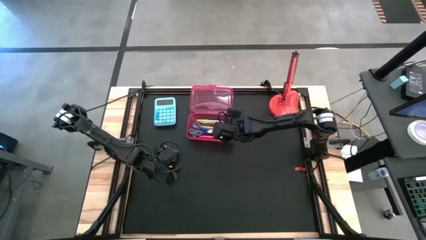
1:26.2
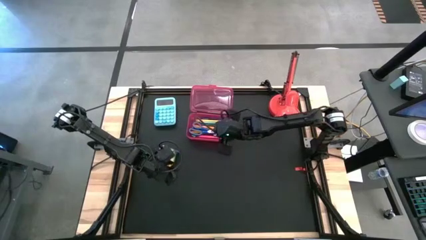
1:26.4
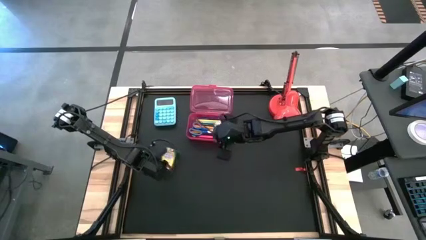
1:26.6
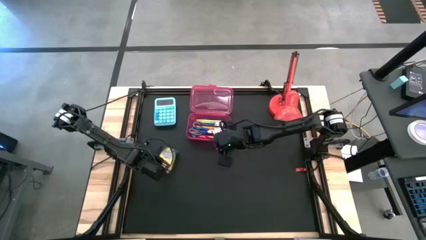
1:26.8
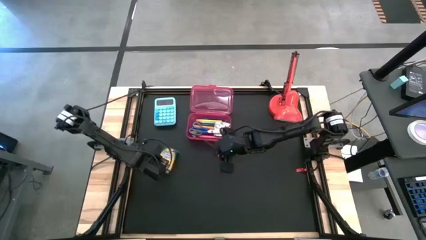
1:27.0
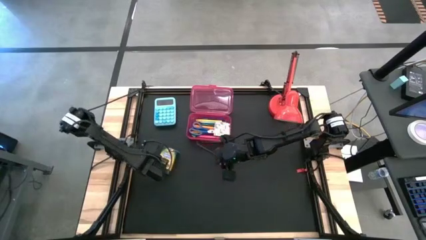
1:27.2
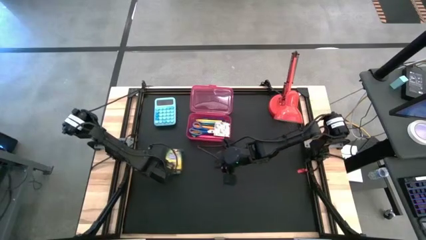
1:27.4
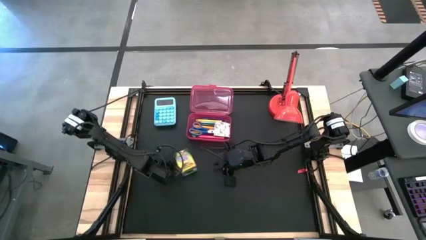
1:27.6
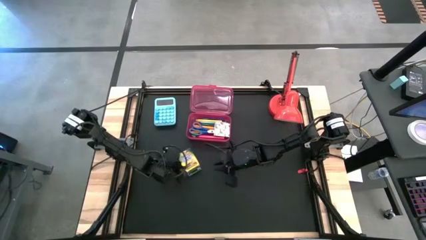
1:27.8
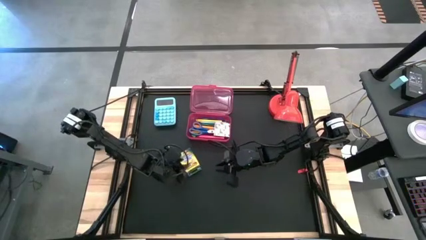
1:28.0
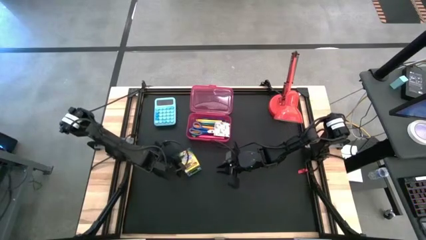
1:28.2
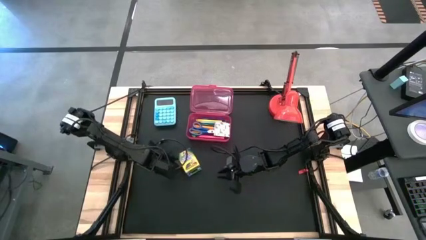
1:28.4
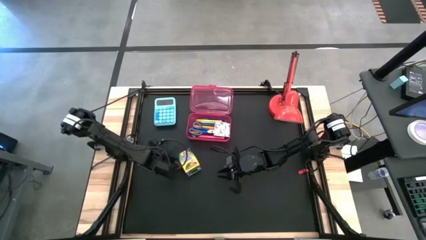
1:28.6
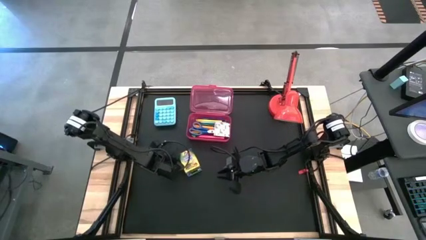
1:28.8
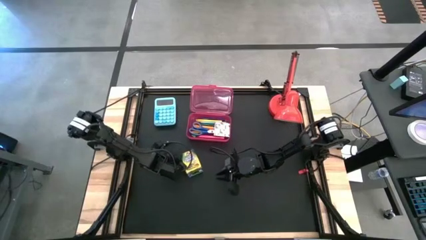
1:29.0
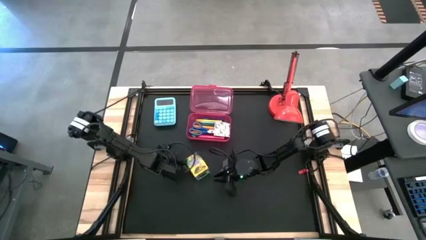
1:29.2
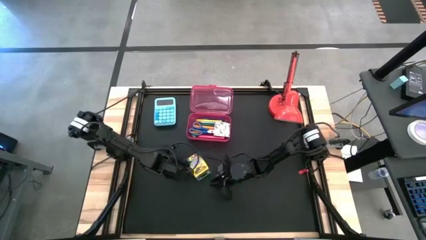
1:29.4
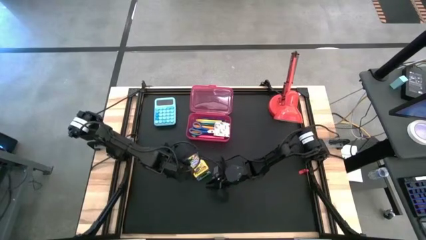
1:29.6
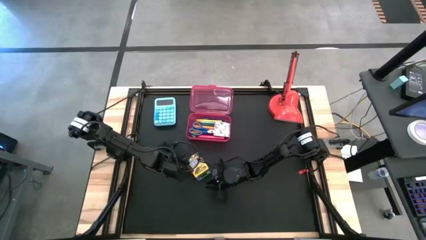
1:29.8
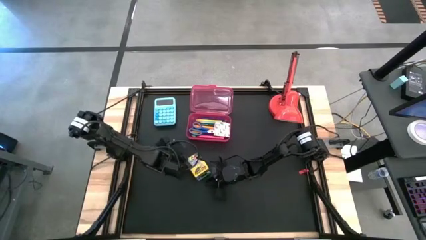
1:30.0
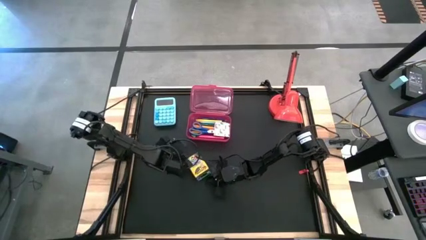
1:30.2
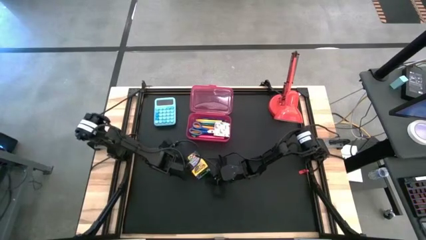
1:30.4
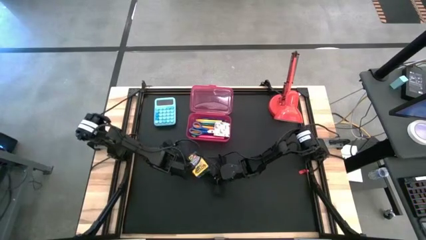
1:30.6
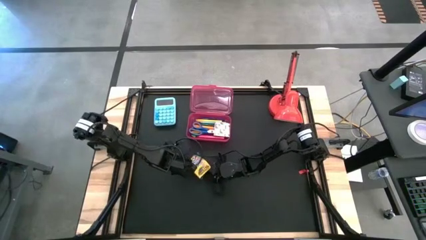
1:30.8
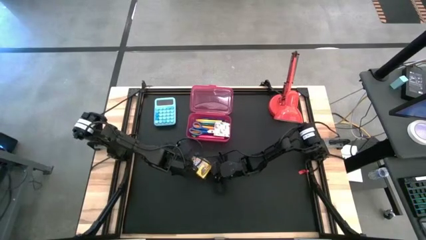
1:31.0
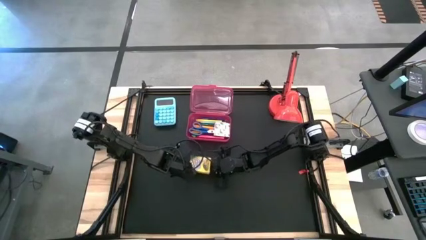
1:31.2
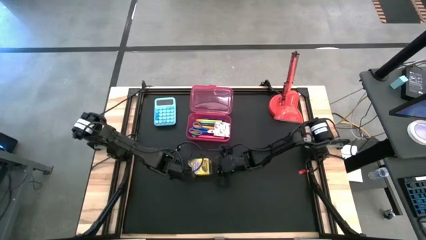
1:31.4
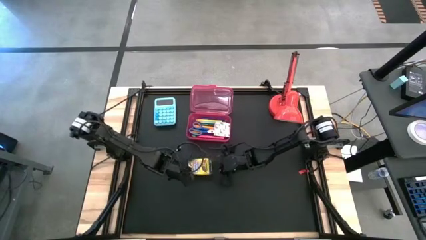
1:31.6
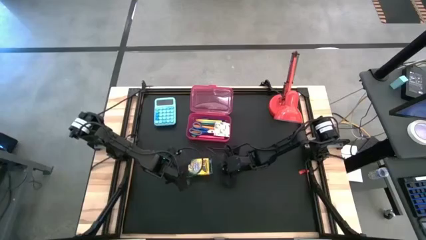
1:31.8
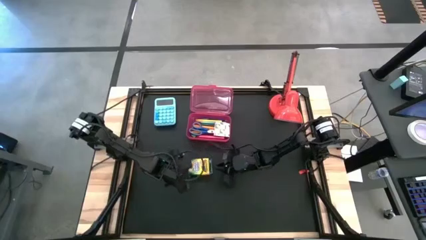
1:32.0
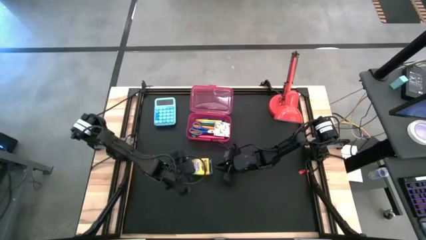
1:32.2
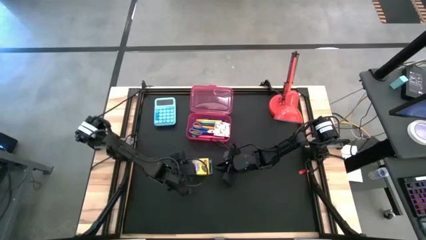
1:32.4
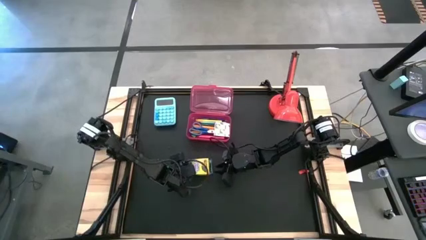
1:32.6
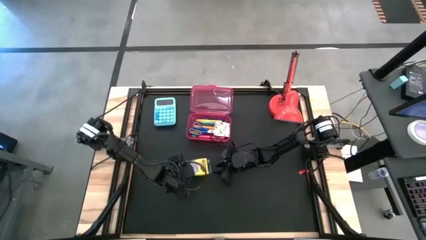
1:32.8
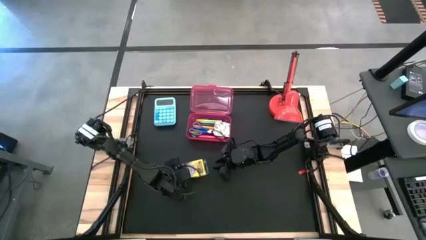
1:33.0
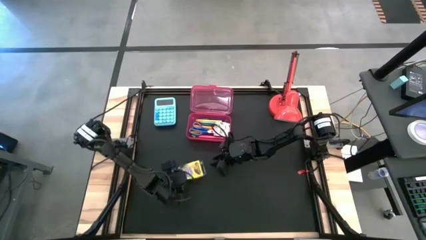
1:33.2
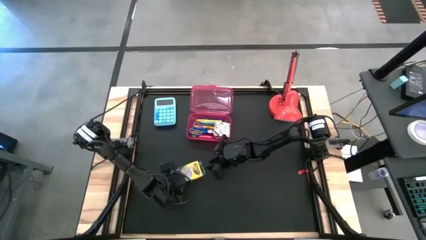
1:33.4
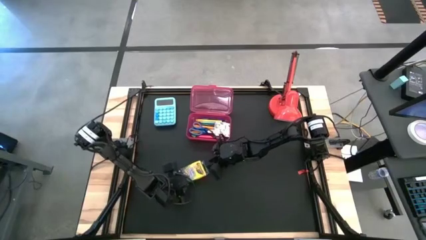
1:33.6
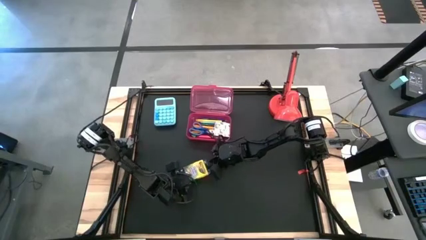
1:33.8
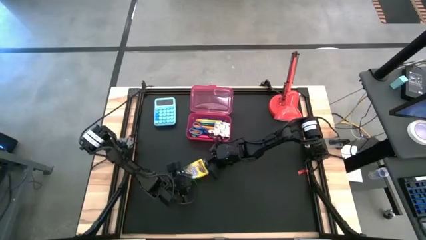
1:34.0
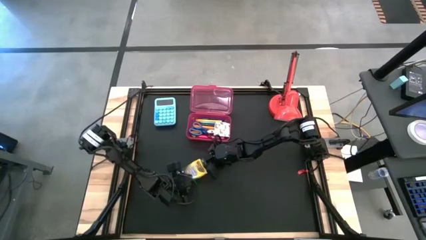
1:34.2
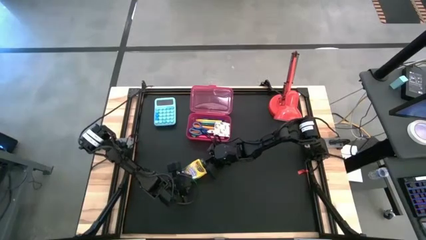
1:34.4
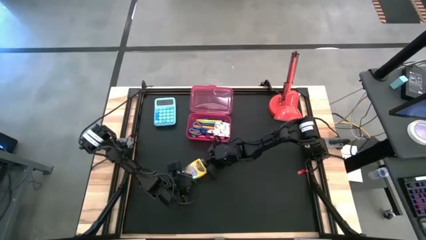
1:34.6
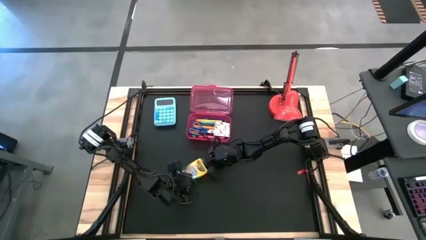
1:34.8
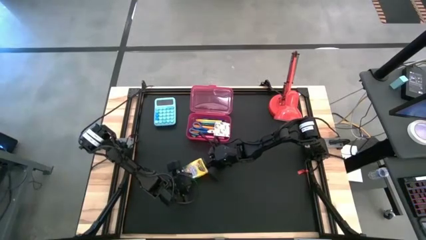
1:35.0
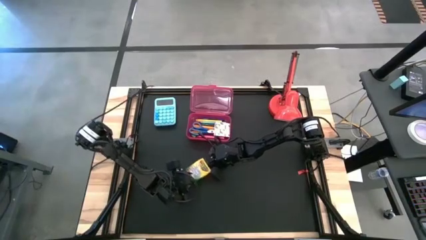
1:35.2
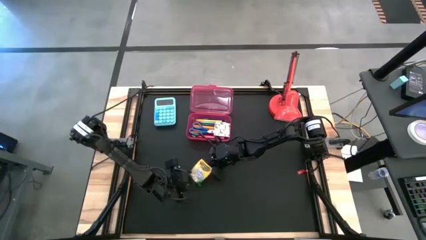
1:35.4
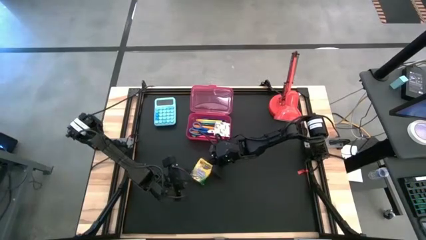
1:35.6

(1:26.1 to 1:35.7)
Task: Pack school essentials
Put the yellow crayon box into the pink supply box

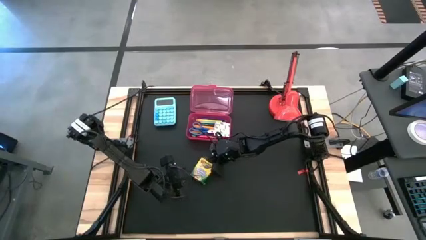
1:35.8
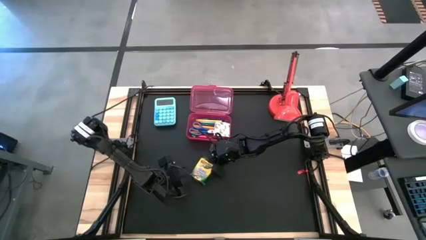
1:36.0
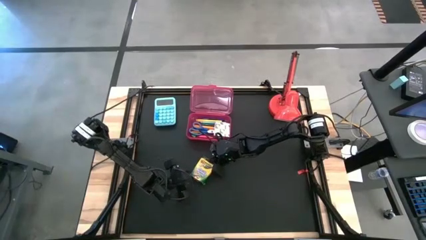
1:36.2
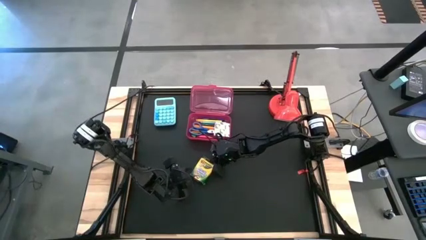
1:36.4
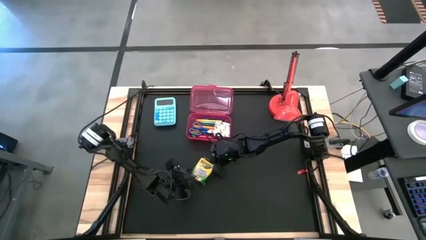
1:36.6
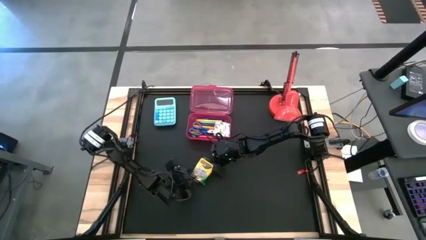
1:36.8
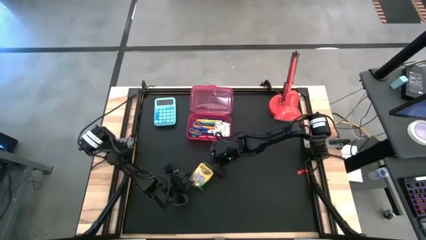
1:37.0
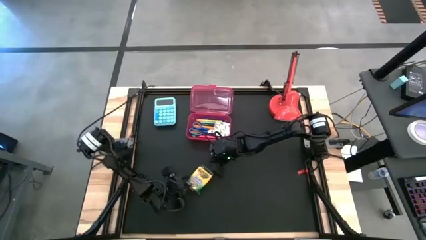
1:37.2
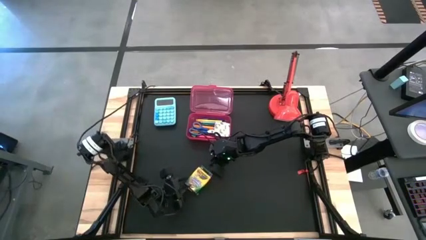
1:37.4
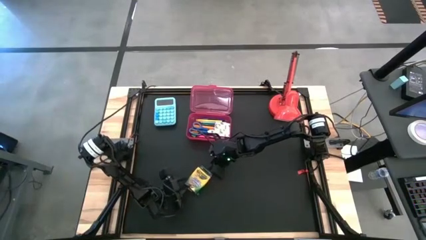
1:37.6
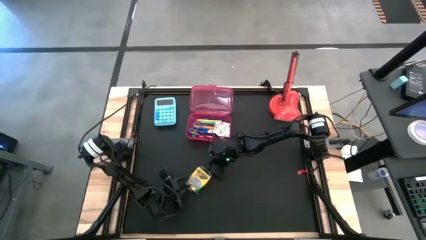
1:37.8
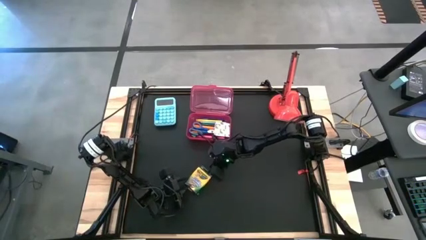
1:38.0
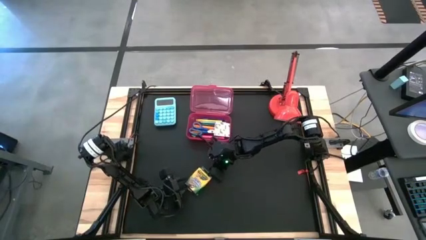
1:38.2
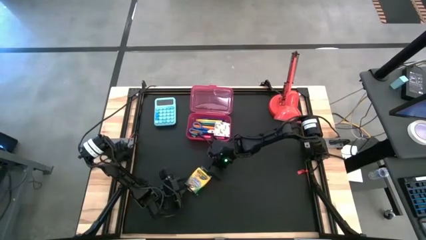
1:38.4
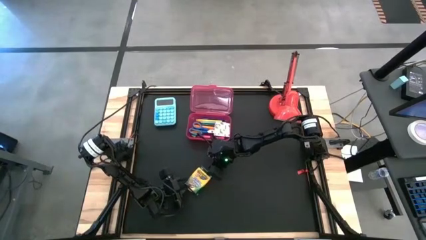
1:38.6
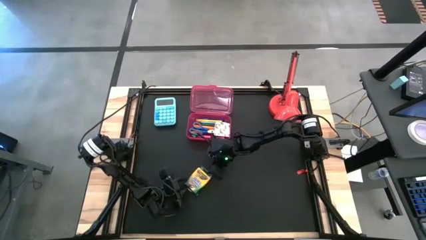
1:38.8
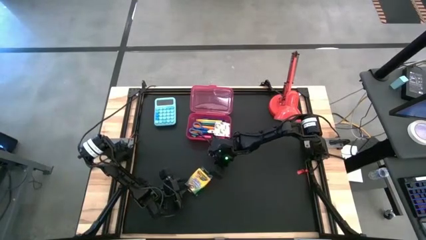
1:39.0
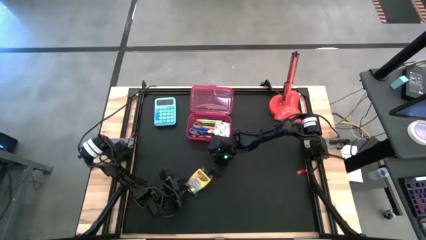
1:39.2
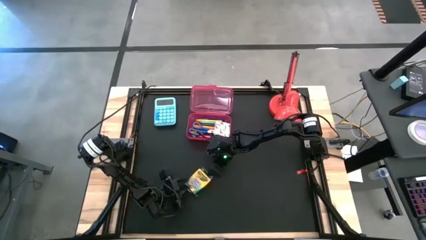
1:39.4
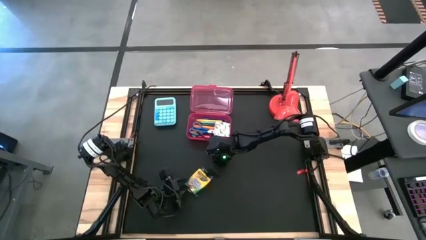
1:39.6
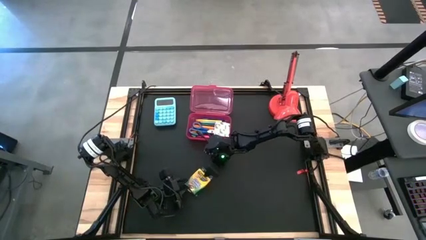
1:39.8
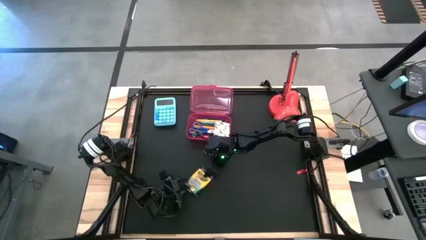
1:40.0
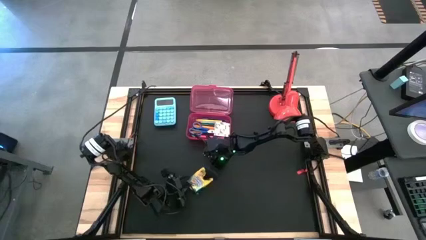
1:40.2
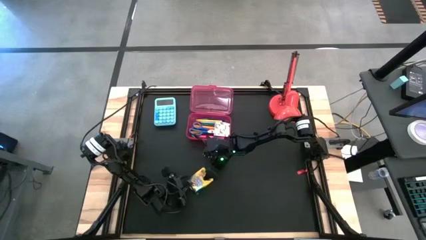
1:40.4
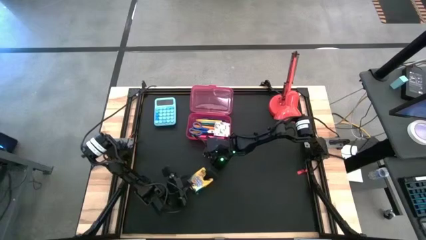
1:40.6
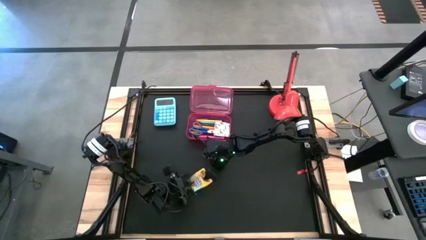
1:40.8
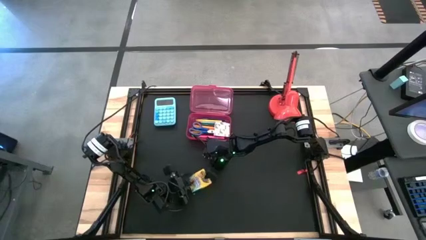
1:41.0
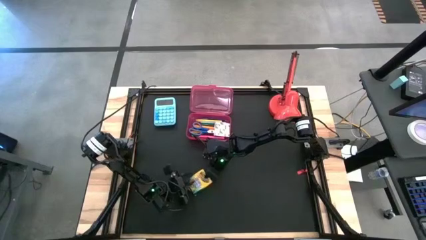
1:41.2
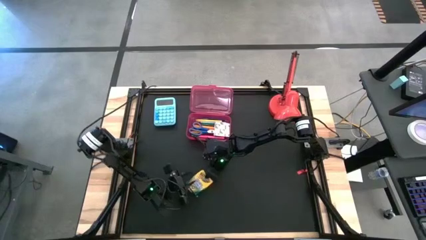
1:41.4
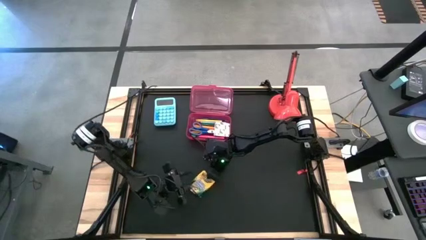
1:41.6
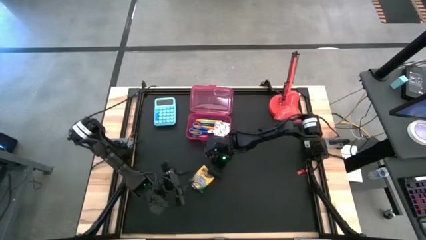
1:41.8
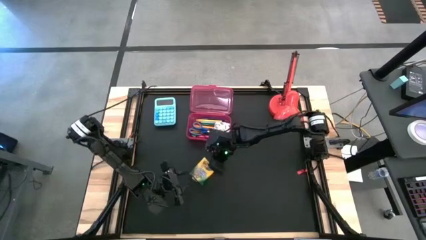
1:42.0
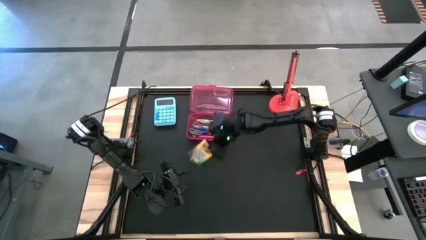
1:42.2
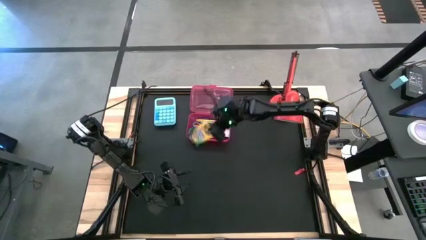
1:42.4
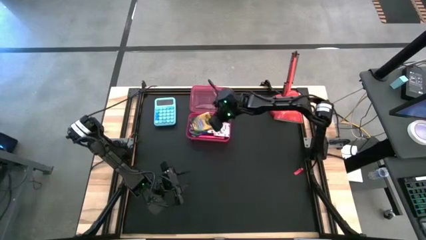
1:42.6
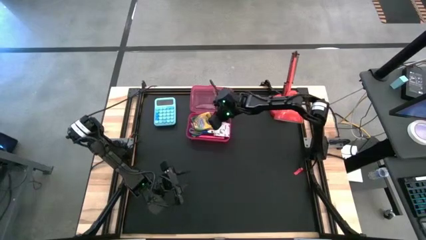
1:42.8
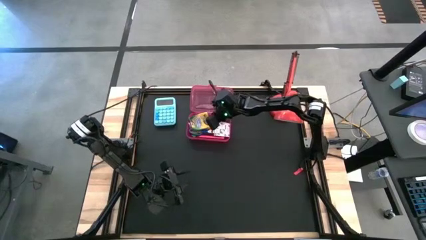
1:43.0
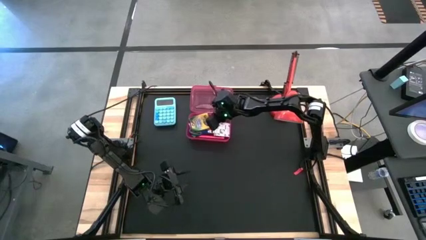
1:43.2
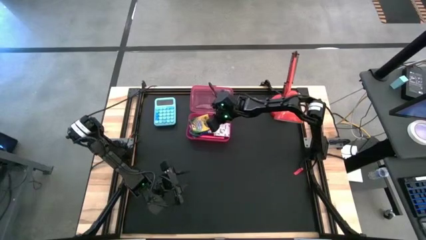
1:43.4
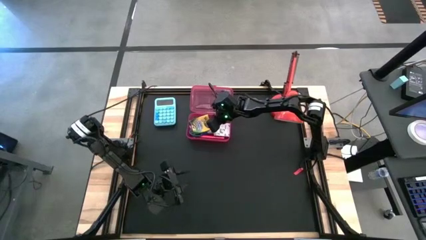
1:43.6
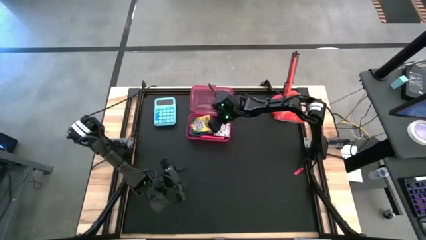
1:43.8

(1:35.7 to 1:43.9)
Put the yellow crayon box into the pink supply box
